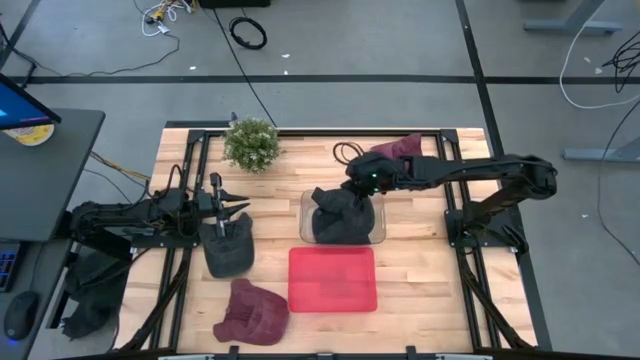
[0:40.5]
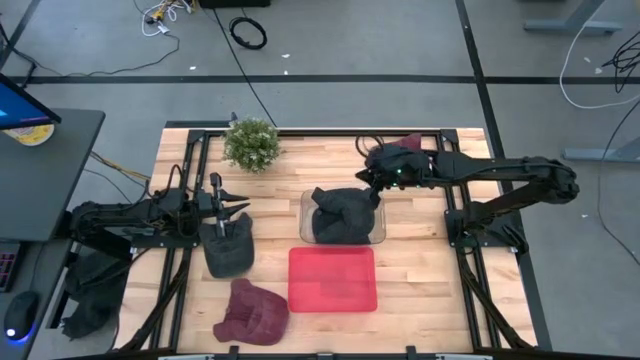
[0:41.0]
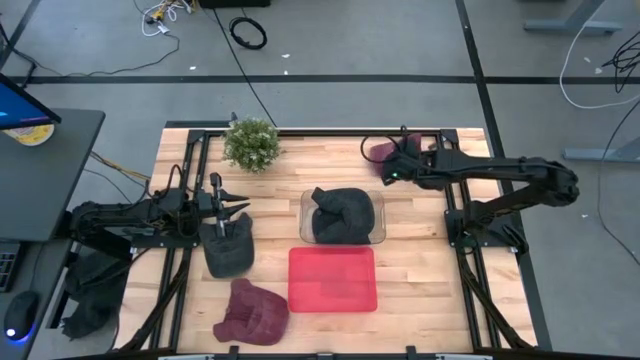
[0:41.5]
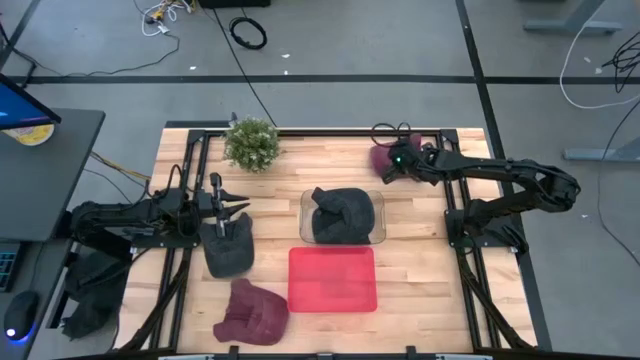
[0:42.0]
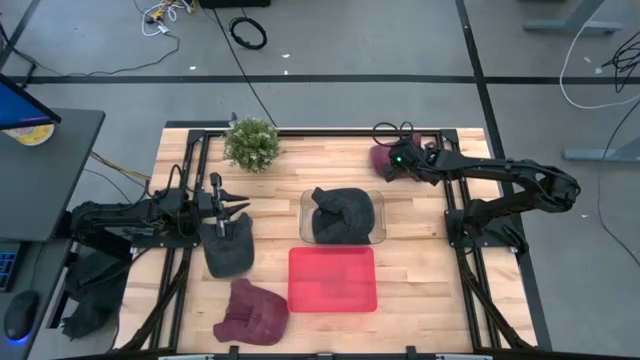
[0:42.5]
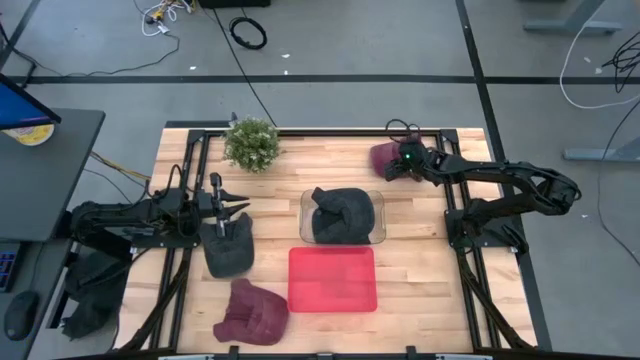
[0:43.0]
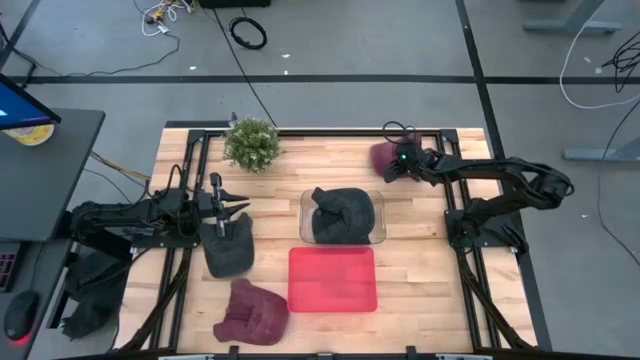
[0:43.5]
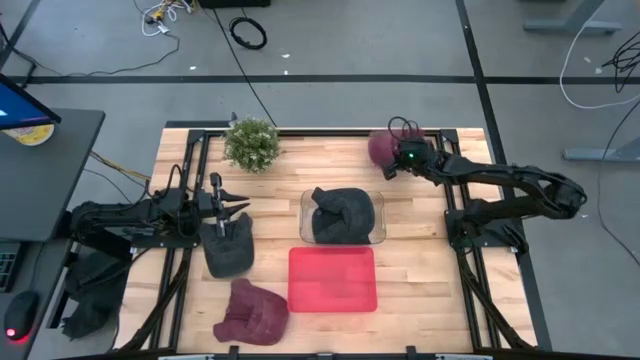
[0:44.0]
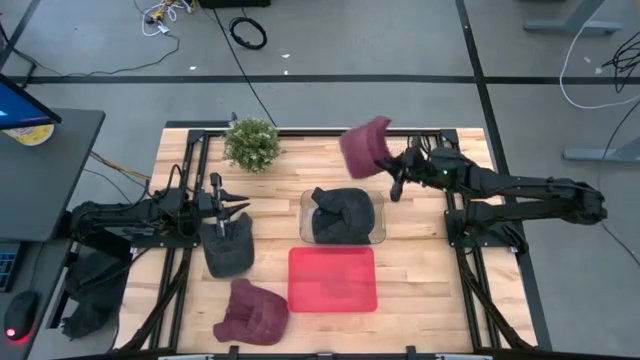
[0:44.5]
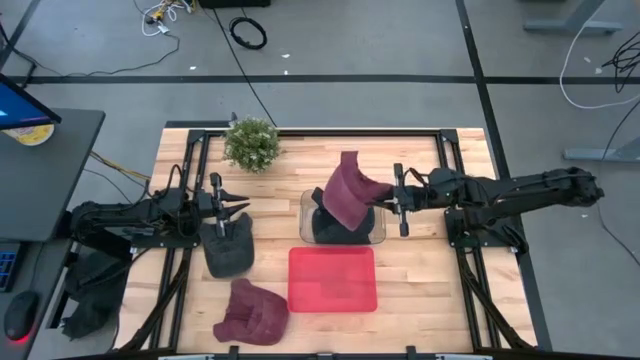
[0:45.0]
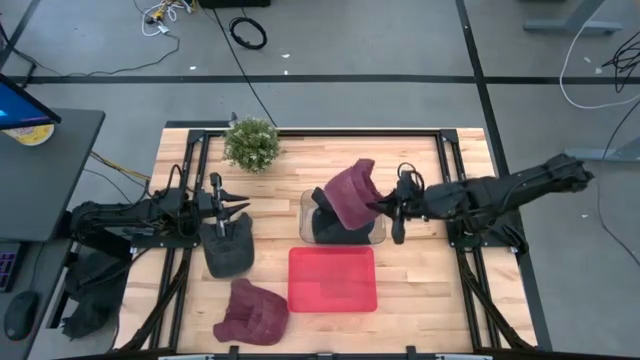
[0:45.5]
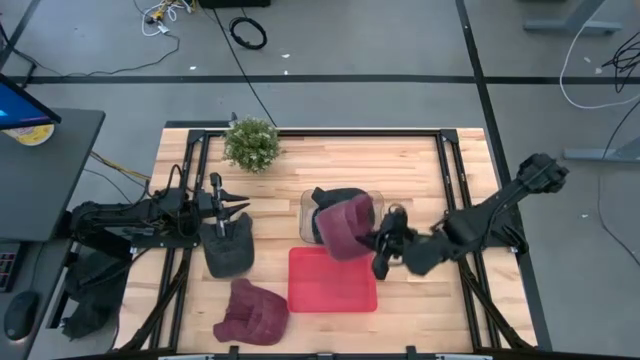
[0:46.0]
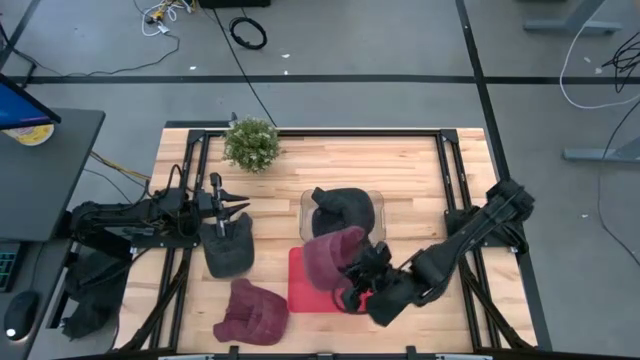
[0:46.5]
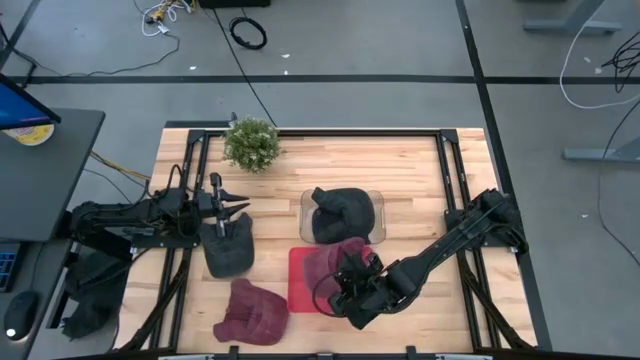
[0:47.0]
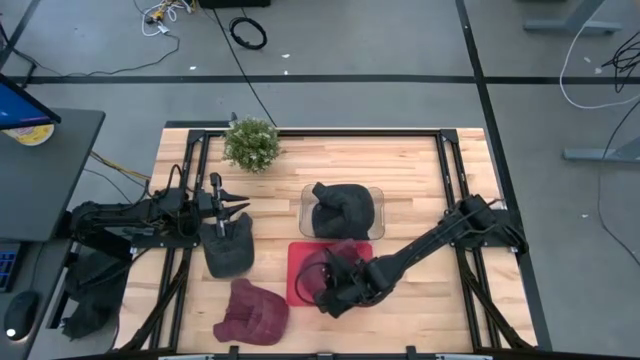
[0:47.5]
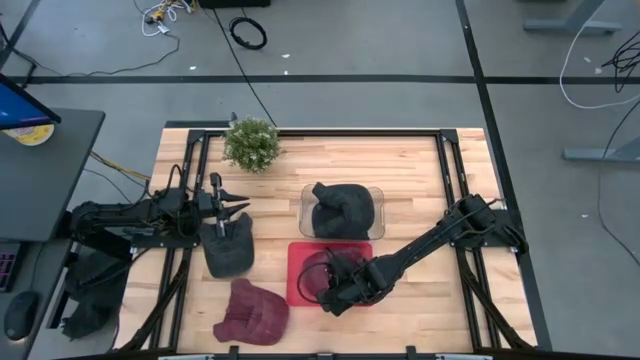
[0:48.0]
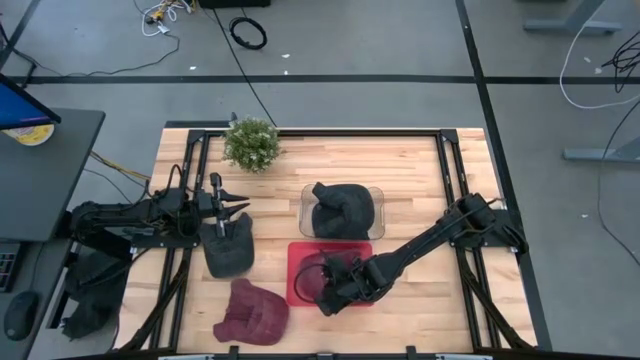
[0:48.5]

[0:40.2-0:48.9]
Task: Pick & Place hat
Put the top dark pink cap into the pink bin

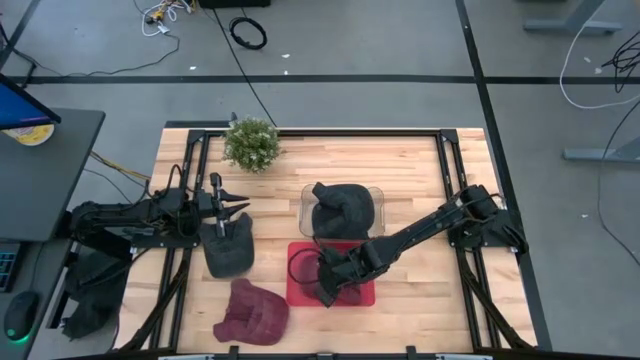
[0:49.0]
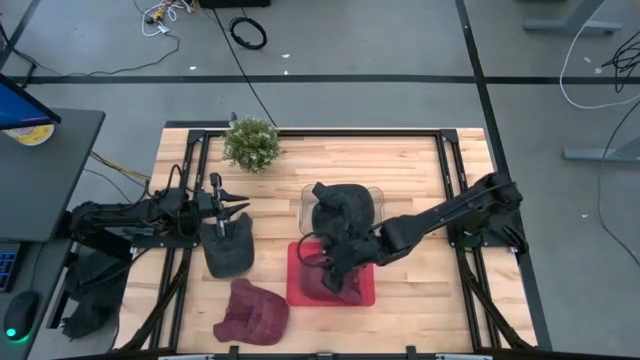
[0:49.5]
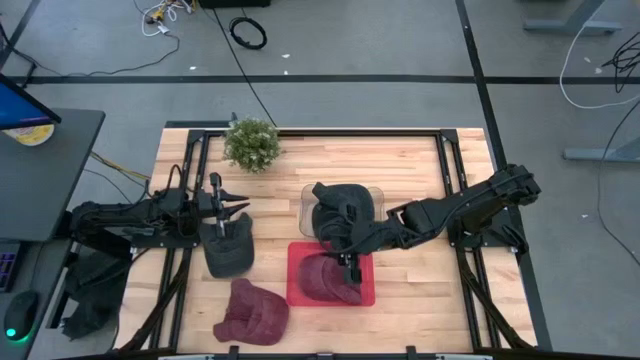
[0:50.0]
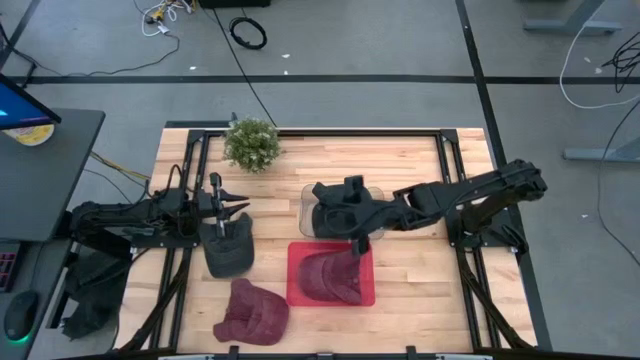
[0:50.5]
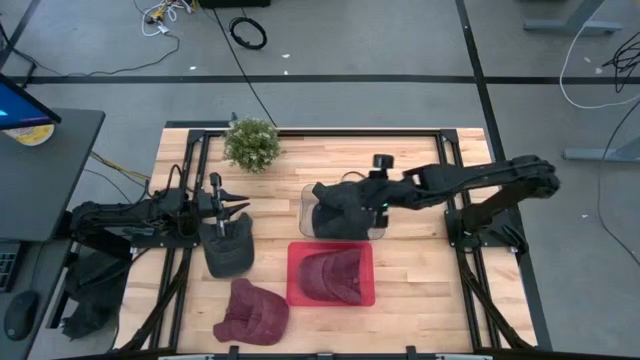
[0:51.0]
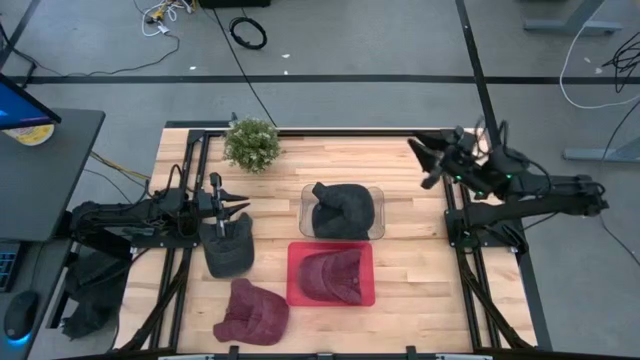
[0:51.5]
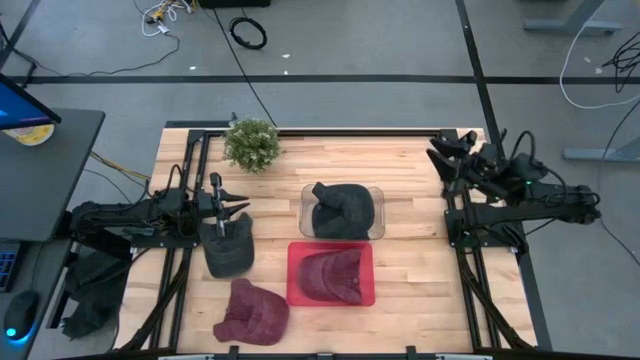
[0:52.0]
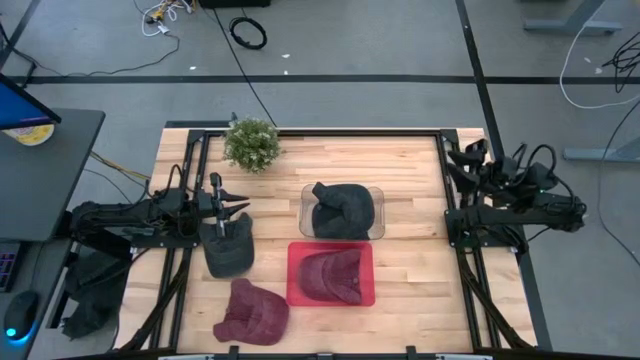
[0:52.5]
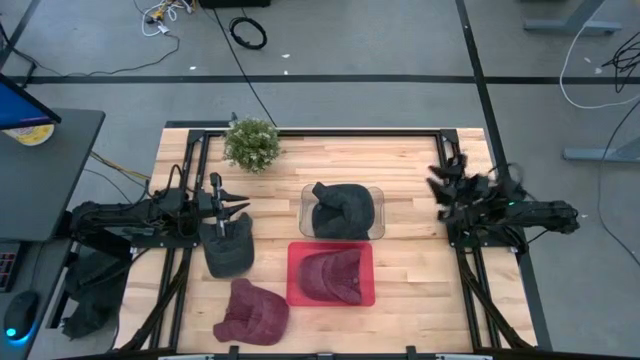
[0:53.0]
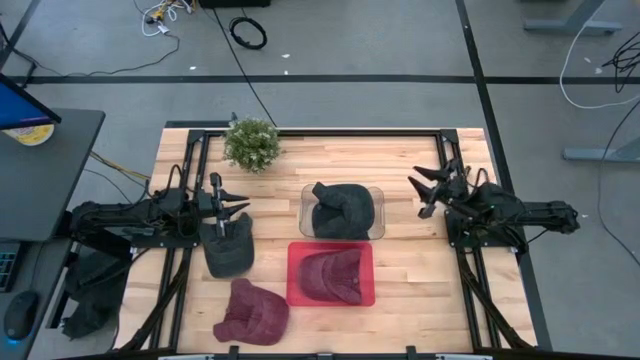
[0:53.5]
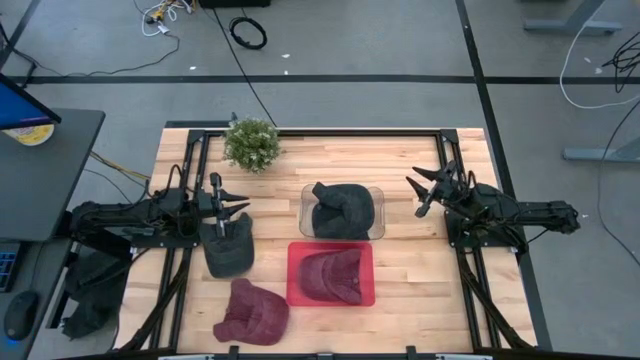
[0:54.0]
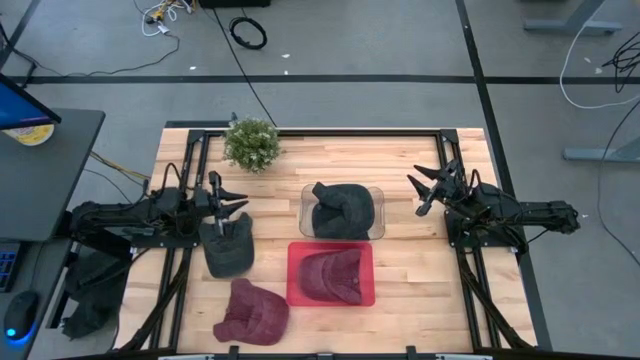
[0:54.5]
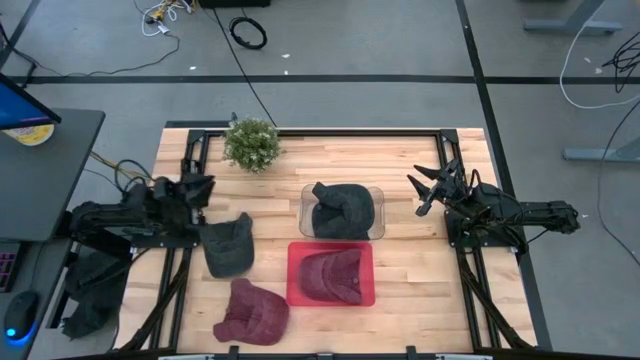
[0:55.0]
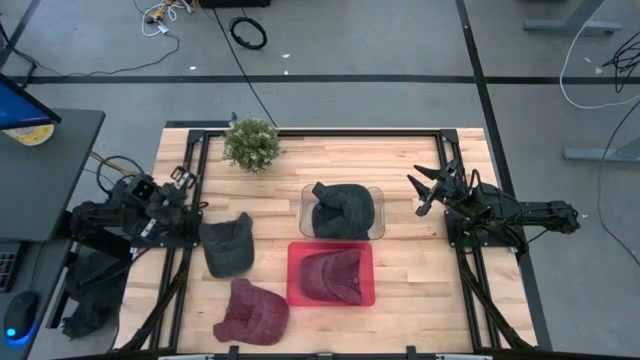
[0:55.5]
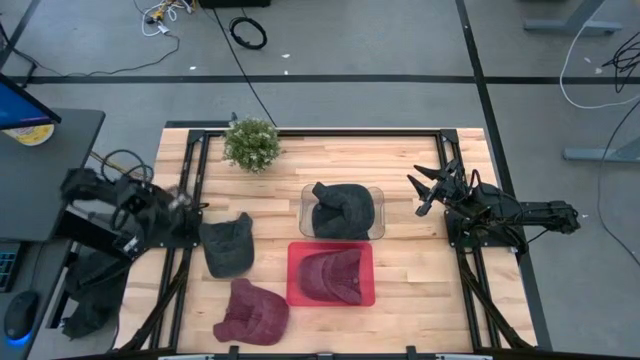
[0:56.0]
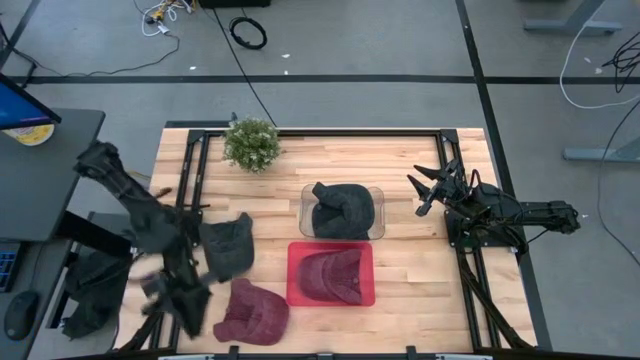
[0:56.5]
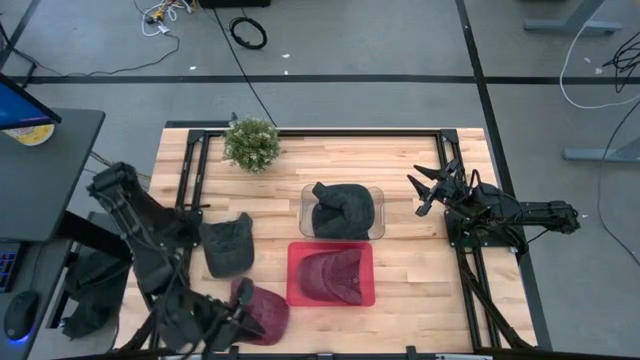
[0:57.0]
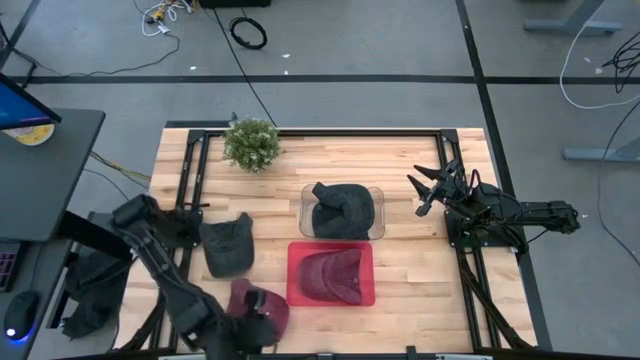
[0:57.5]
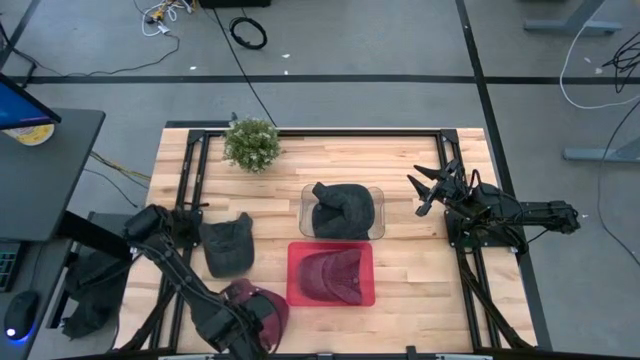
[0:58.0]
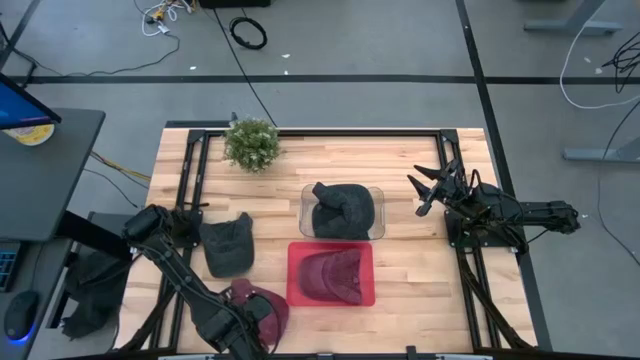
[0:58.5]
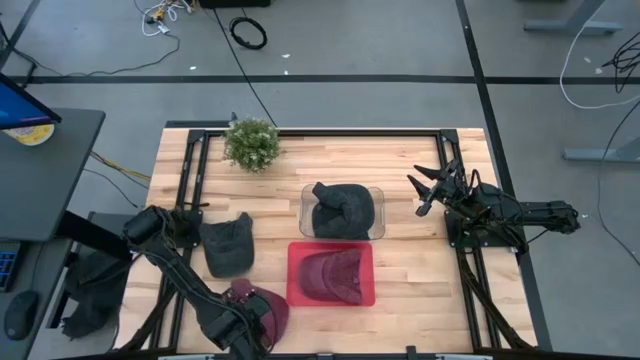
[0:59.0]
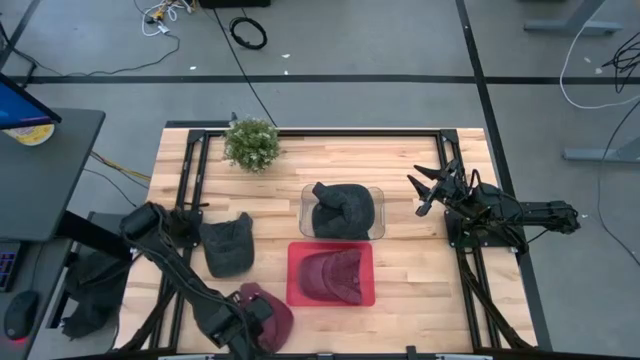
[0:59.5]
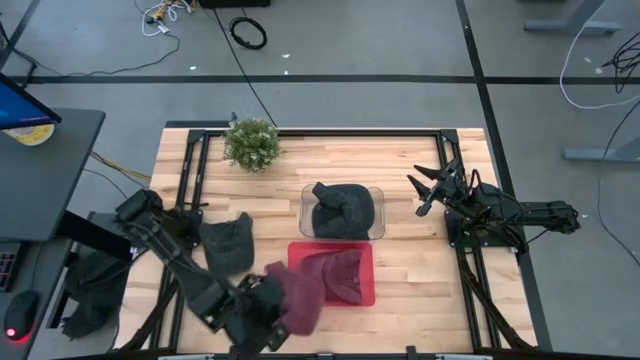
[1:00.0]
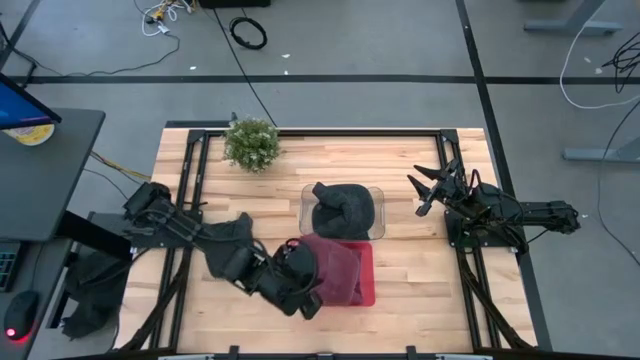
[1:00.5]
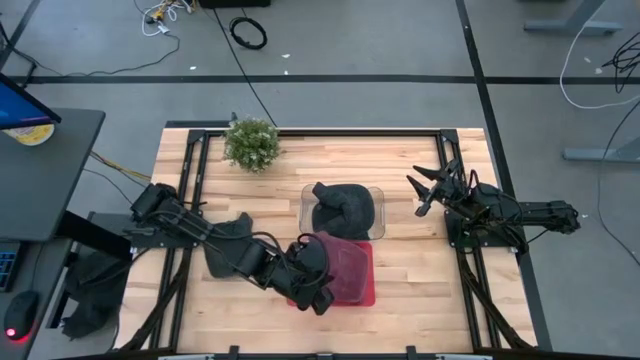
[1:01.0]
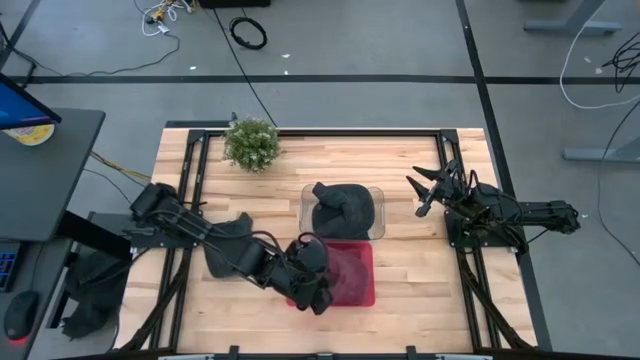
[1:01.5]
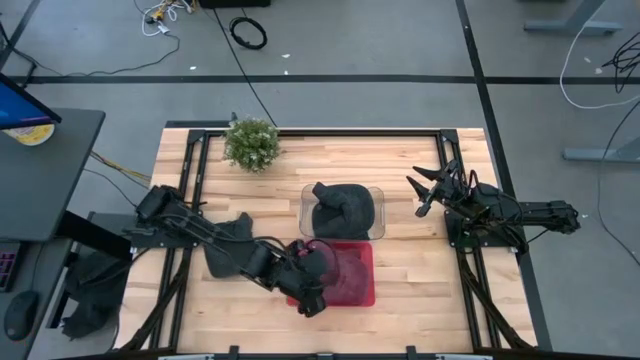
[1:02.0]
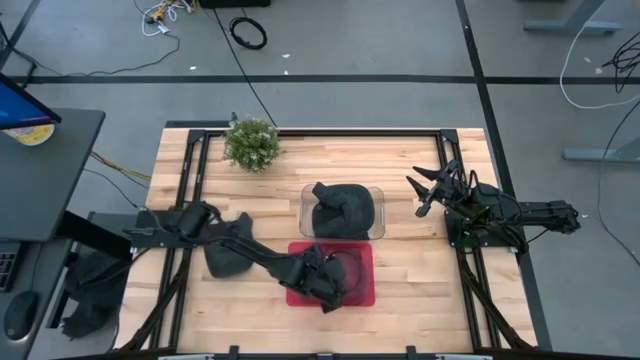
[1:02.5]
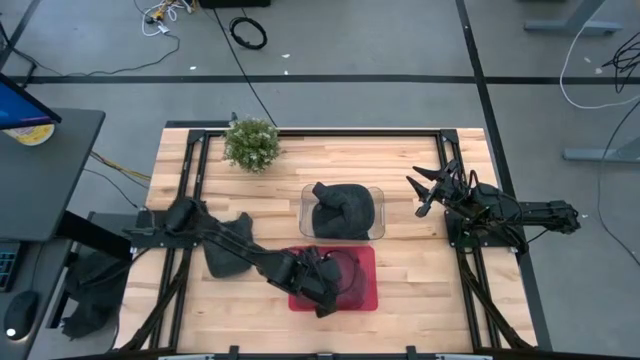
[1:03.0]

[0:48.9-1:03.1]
Put the red cap into the pink bin
